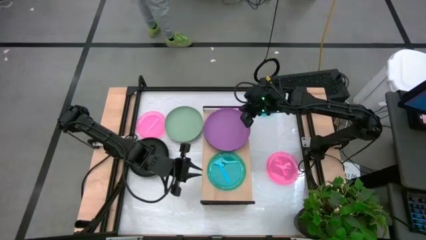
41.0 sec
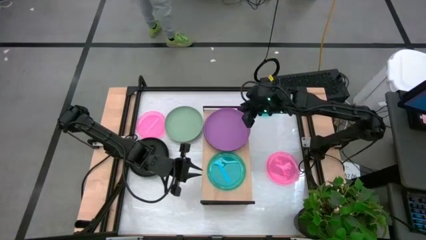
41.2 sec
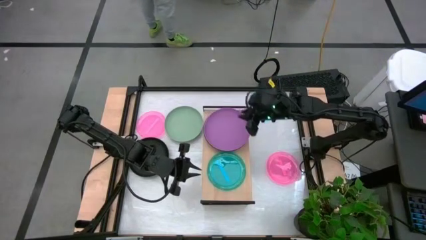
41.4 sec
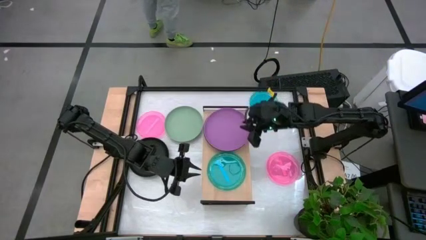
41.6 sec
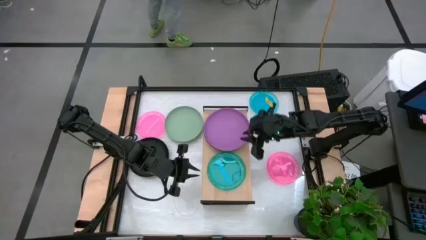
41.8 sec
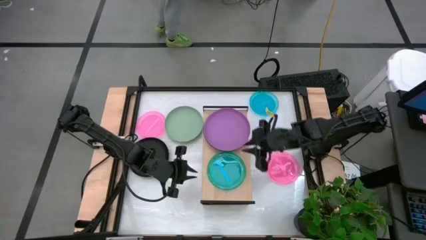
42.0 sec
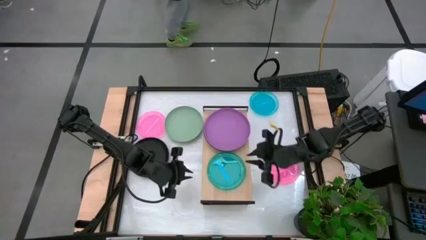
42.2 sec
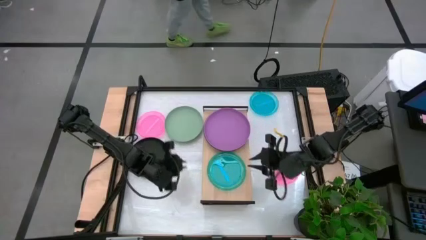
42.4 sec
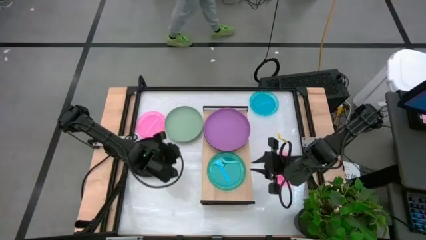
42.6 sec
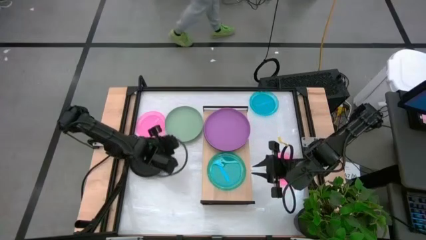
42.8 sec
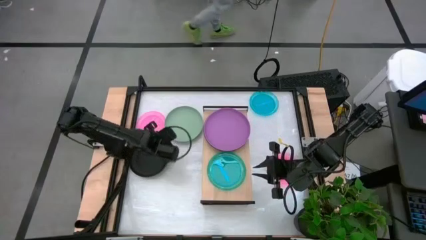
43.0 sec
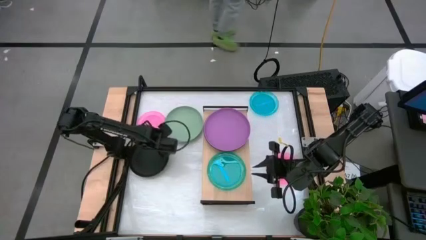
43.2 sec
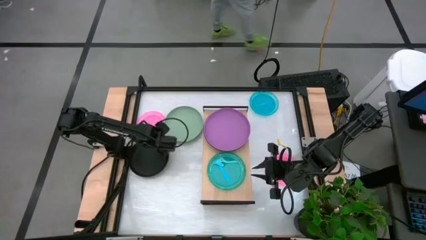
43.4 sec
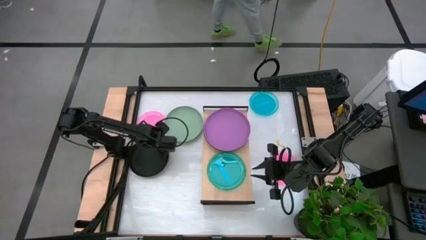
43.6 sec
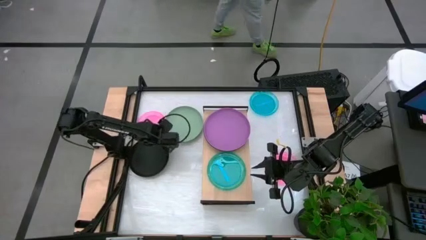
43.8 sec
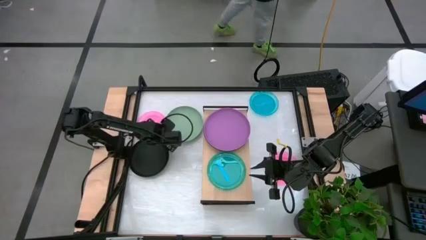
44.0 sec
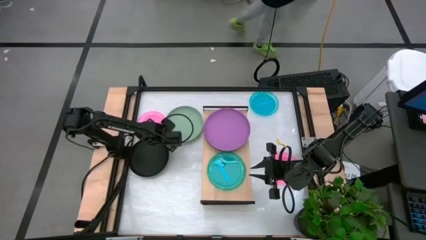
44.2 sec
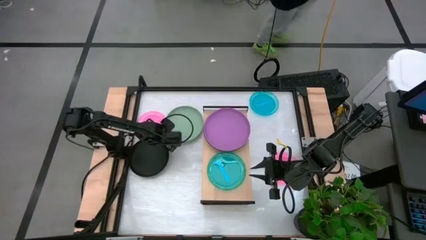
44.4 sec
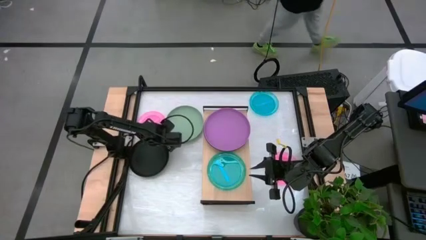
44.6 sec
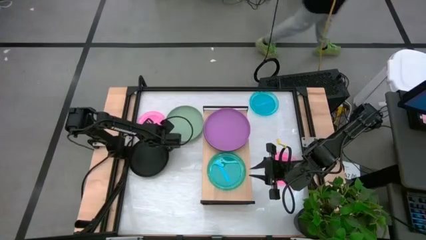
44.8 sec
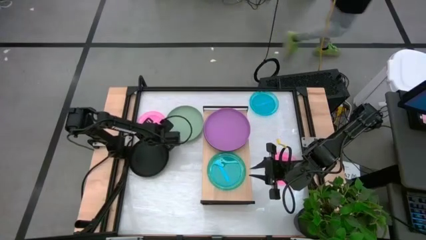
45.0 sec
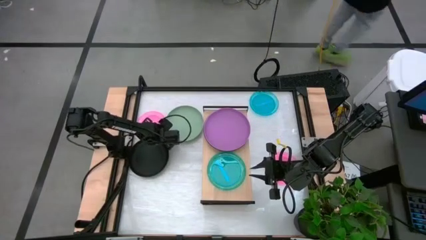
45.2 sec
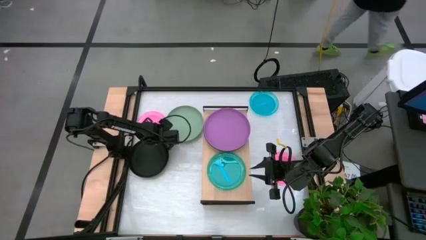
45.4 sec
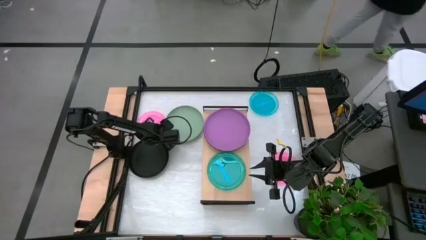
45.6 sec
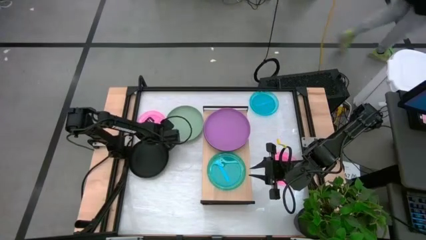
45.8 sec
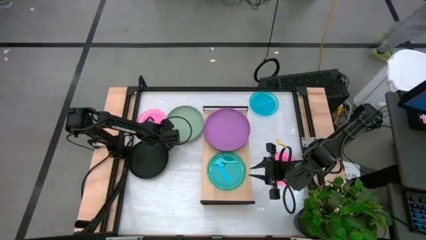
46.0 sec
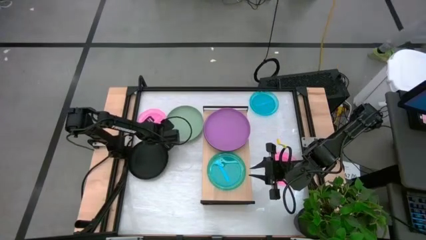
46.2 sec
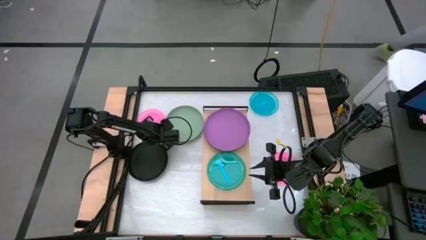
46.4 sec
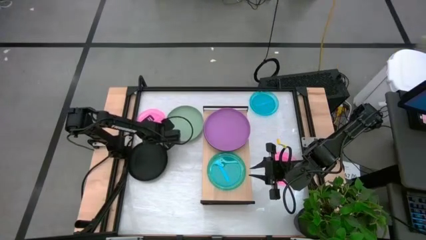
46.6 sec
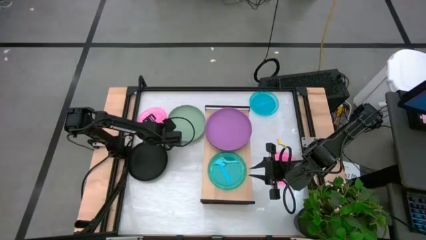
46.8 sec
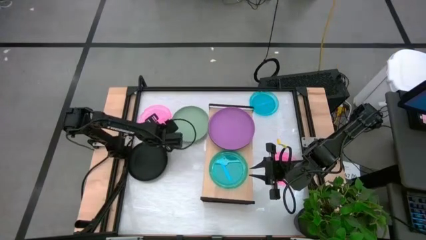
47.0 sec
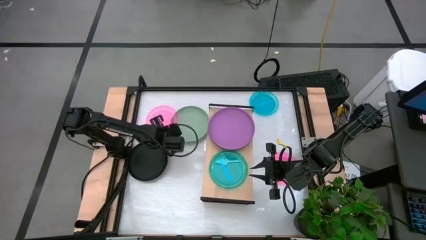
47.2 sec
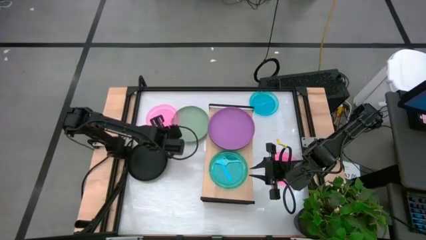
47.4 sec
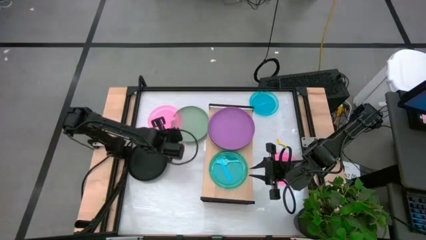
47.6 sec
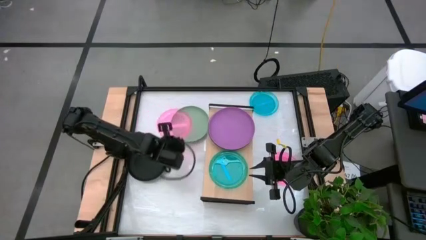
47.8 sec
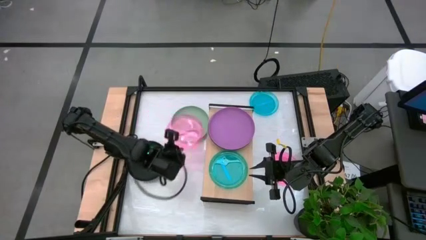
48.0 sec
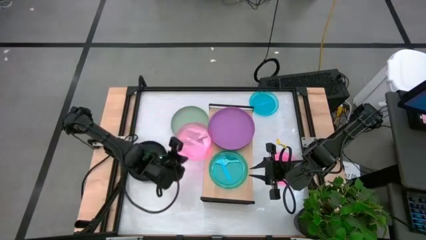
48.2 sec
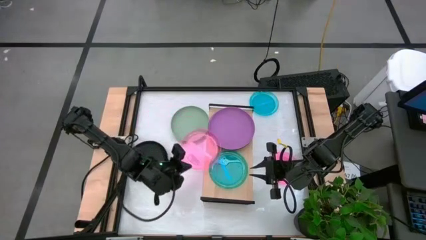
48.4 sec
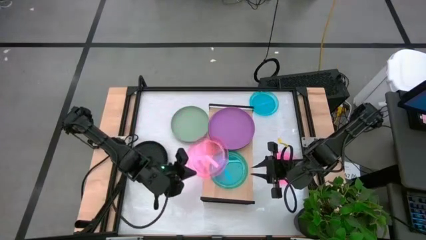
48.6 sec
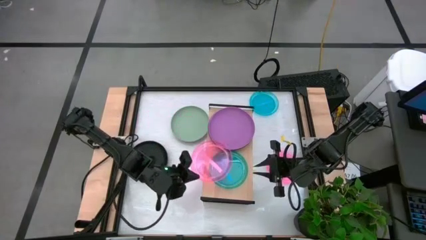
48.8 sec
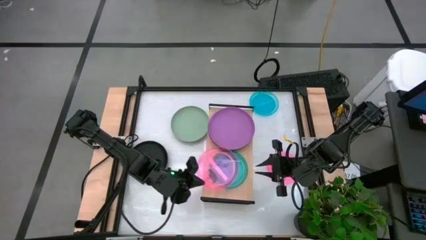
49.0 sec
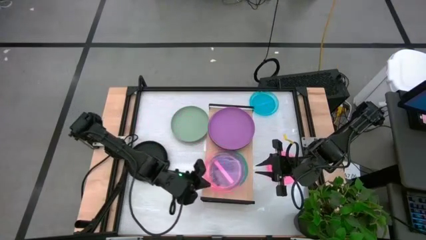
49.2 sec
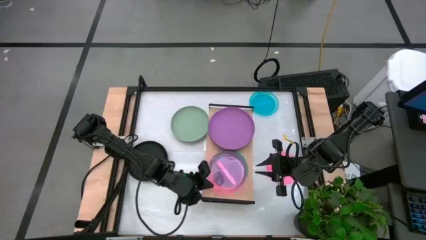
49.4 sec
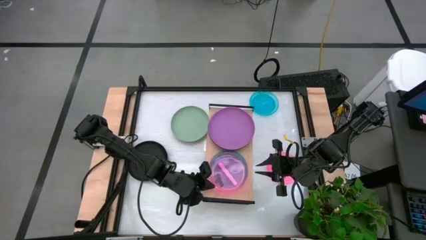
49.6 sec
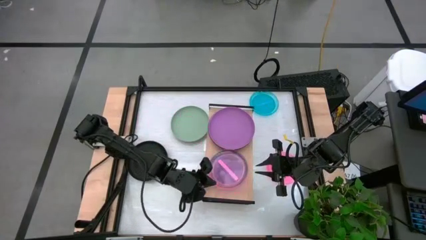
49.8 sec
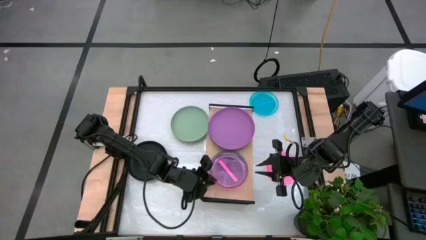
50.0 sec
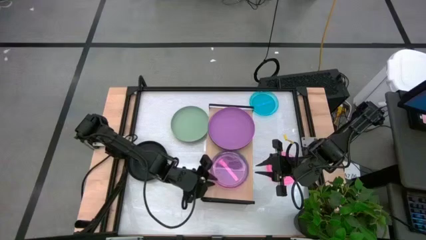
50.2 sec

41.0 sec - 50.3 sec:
Task: Place and stack plates onto a shelf
Stack the left pink transparent plate on top of the blue transparent plate on the shelf

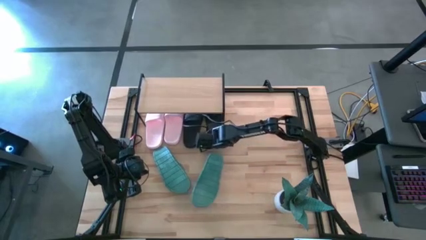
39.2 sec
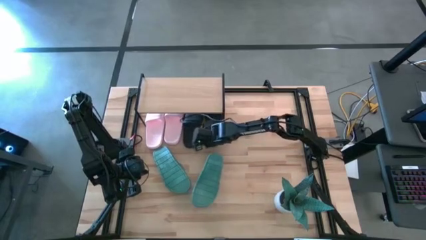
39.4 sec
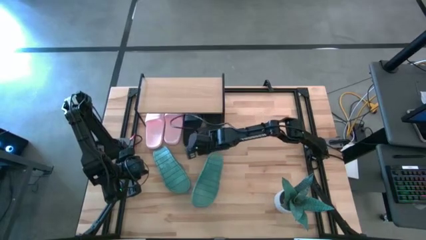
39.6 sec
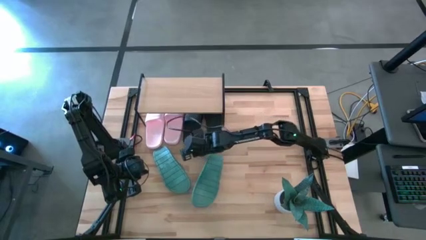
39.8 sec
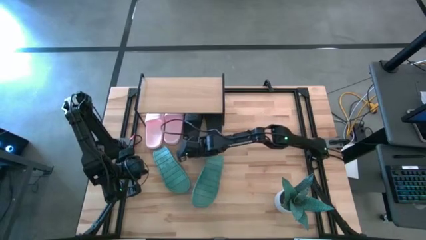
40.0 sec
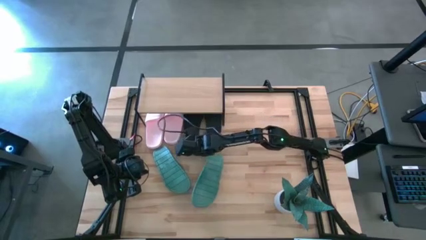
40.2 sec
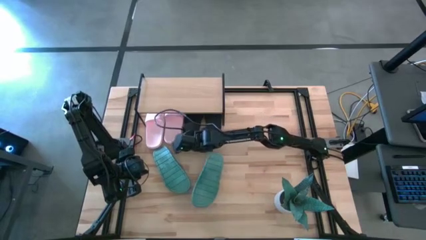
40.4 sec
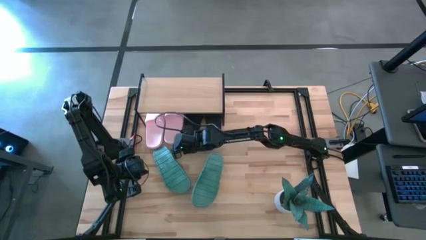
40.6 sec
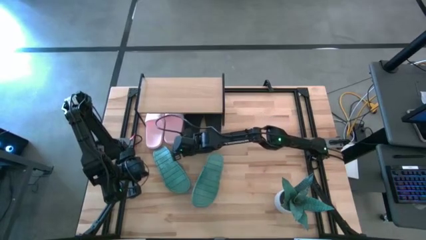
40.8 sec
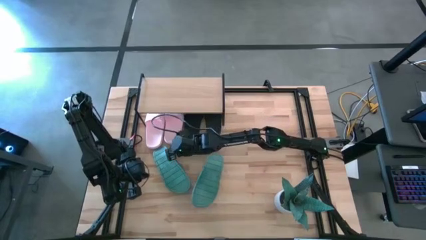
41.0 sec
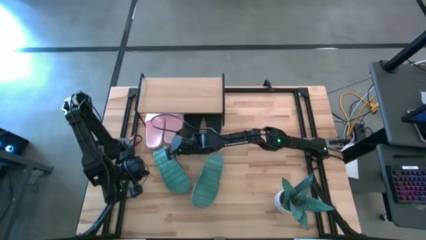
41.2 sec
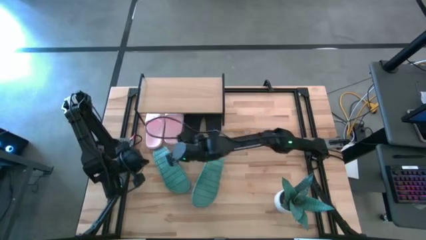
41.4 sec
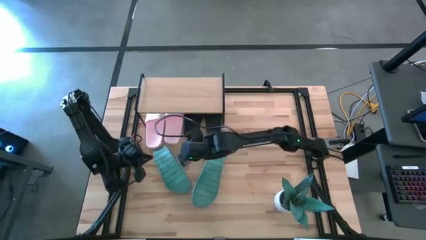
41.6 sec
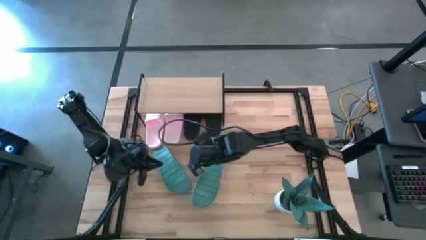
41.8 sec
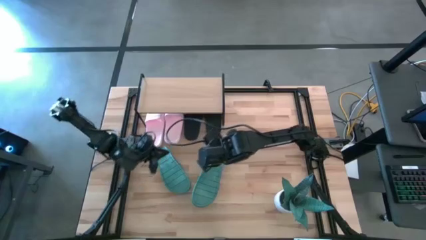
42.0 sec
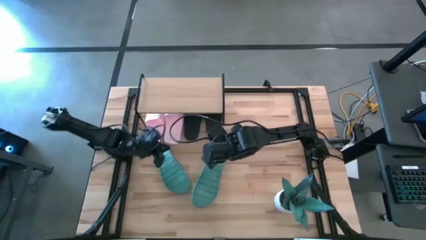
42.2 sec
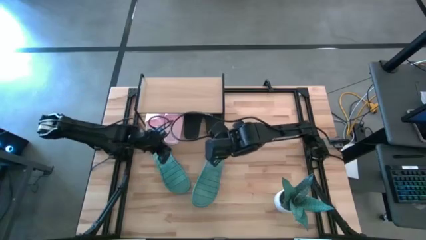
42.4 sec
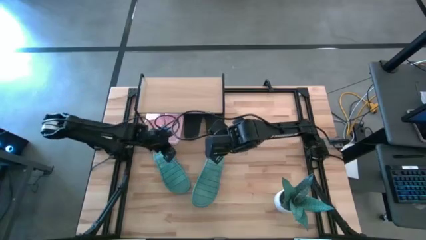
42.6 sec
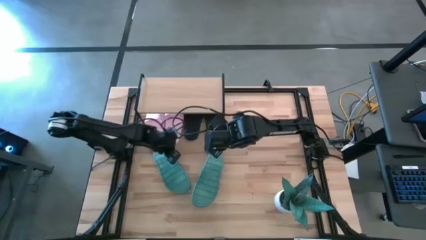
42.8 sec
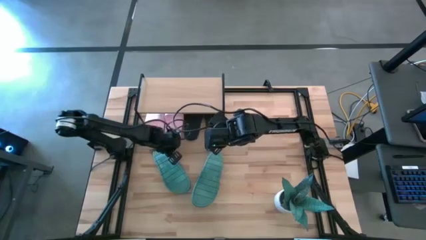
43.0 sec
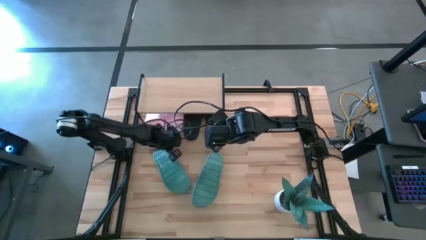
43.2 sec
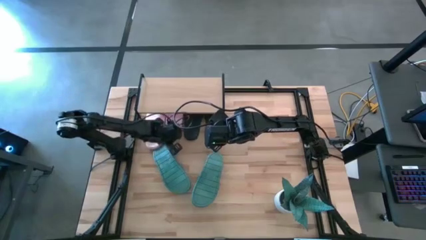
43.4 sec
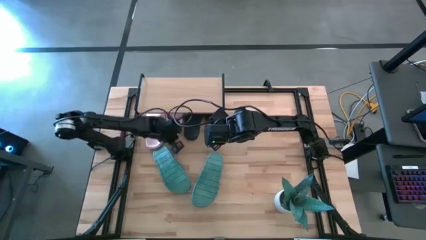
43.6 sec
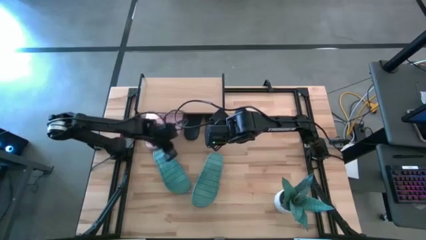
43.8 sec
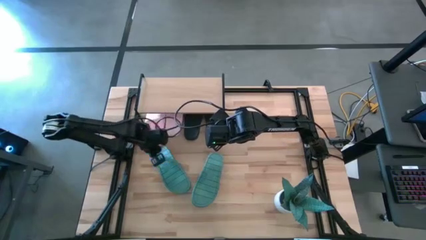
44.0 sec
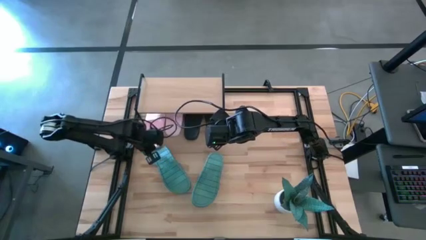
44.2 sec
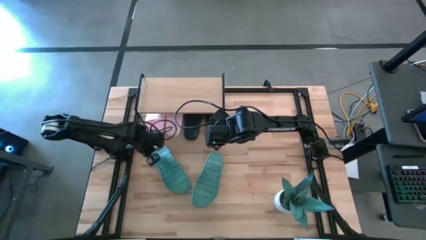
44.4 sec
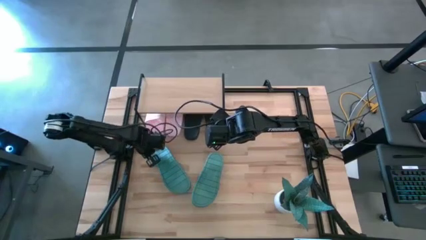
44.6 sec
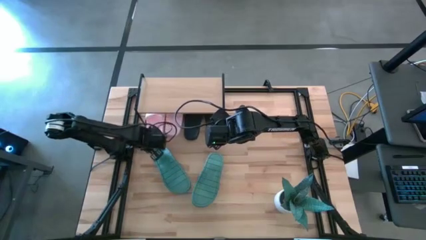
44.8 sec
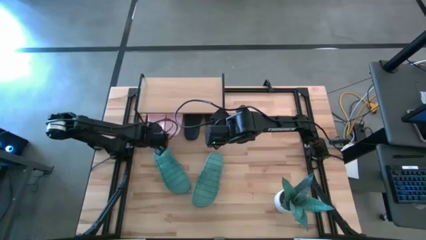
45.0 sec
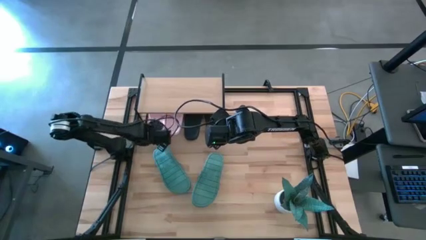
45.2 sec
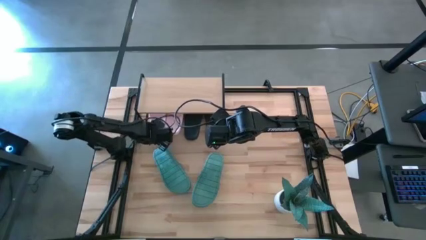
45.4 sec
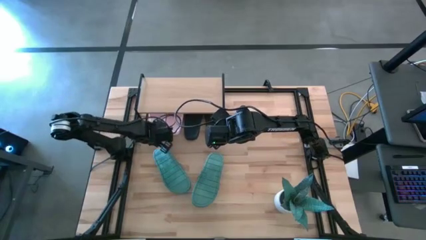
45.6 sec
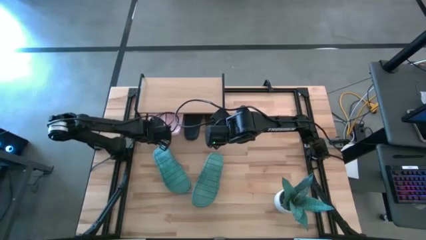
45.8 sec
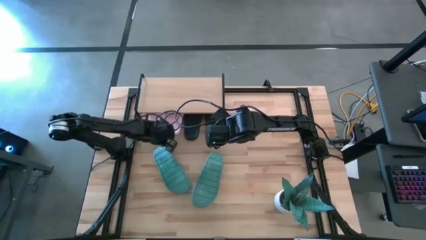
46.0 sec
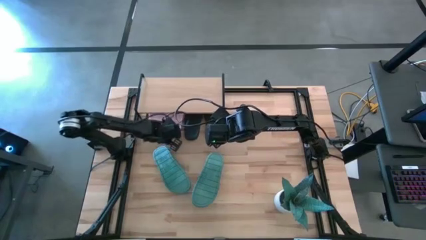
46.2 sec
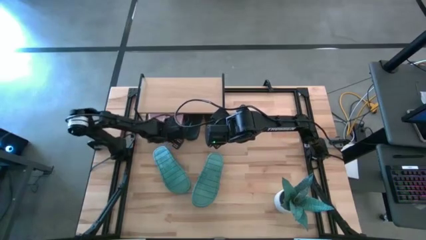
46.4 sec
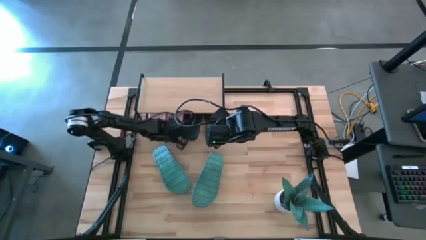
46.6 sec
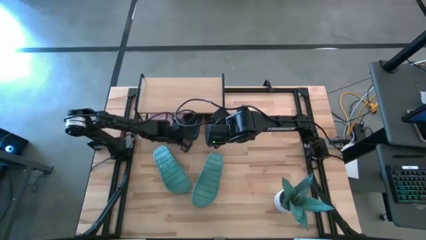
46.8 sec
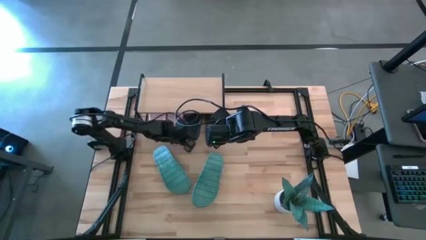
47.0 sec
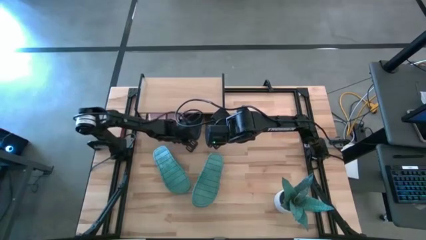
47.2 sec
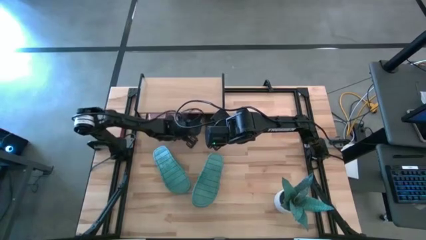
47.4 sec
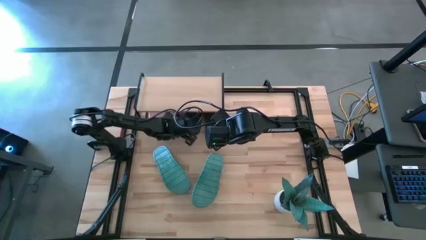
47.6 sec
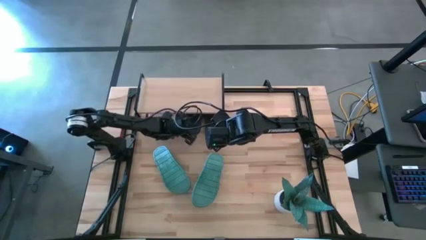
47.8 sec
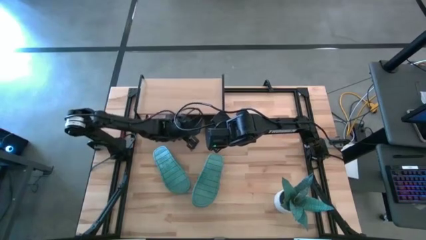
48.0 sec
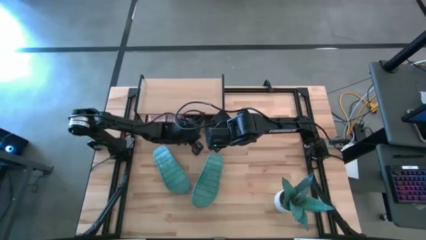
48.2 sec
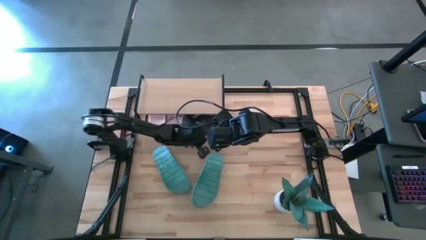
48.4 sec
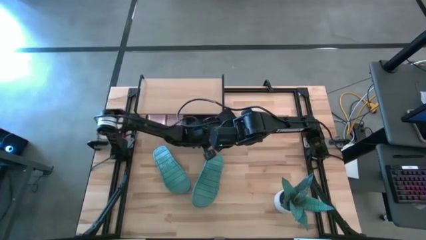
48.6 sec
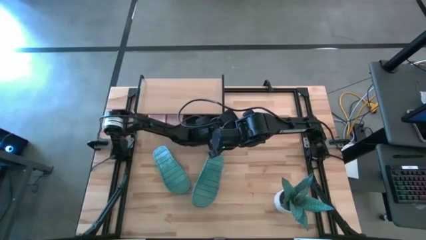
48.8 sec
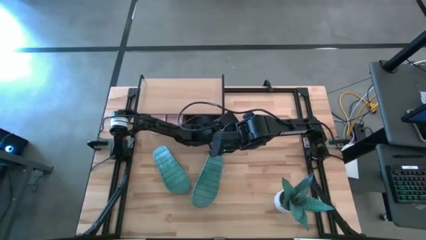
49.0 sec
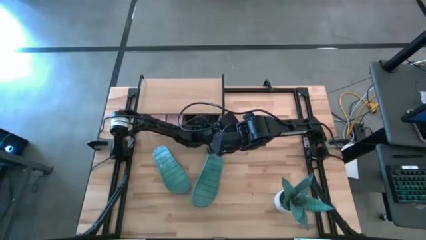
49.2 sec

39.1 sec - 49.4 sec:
Task: Pick and place slides into the shelf
Adjust the black and pink slides under the shelf
